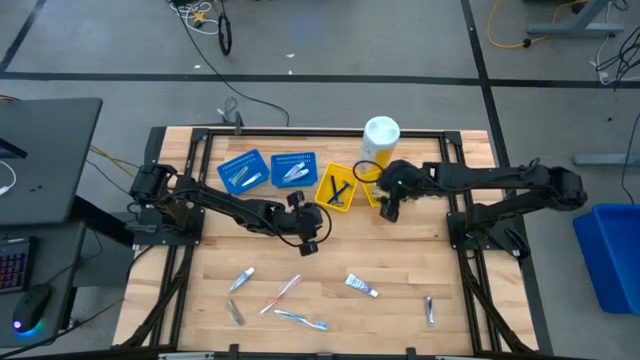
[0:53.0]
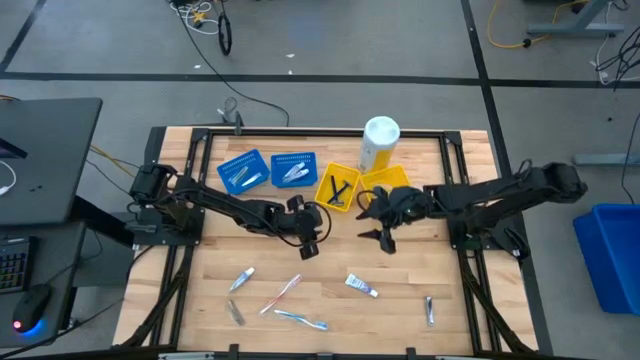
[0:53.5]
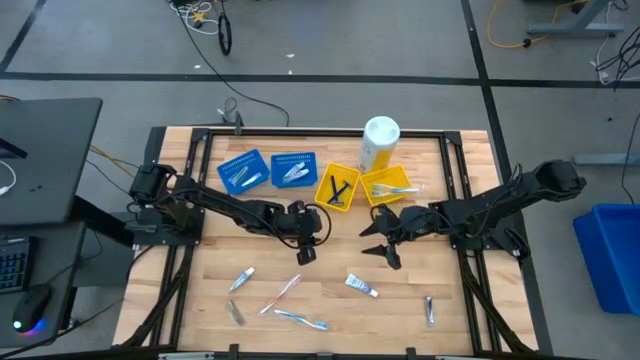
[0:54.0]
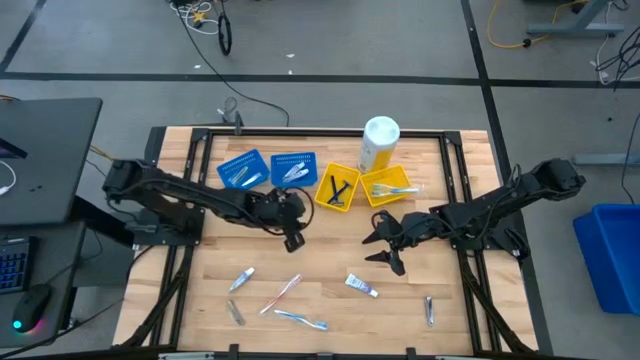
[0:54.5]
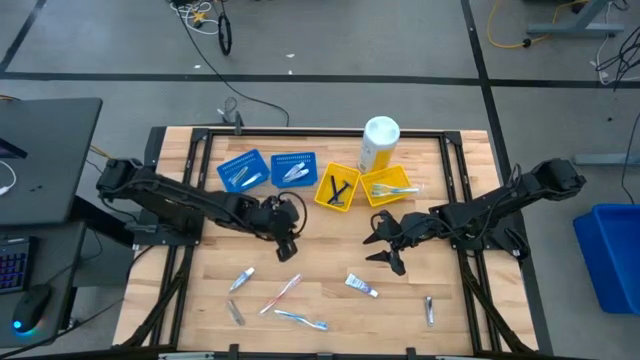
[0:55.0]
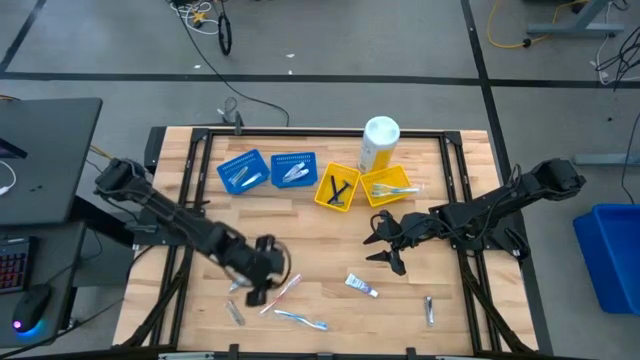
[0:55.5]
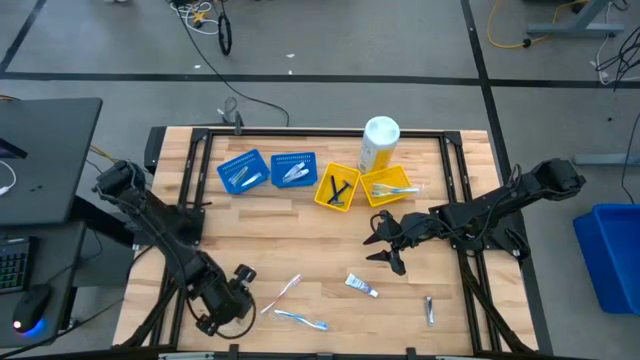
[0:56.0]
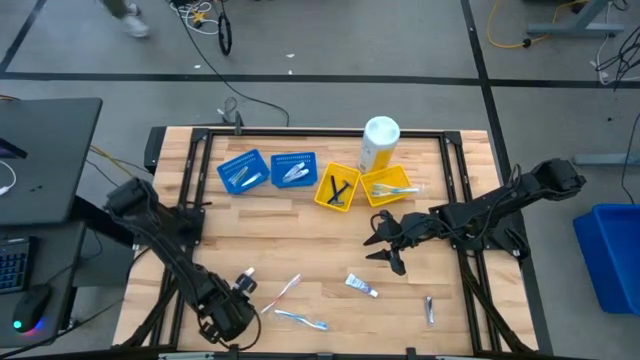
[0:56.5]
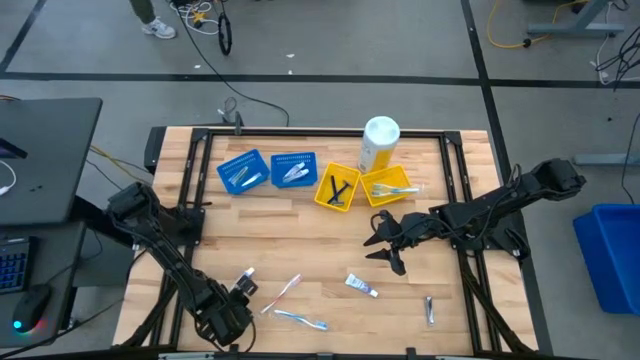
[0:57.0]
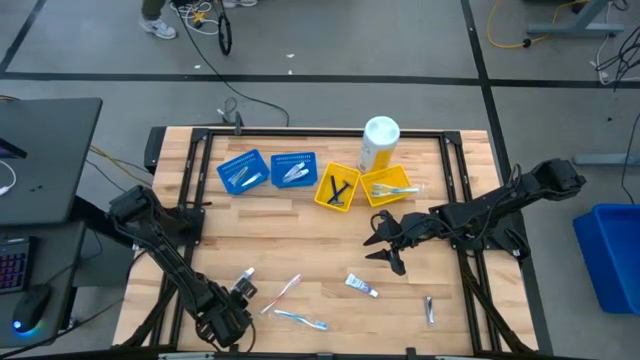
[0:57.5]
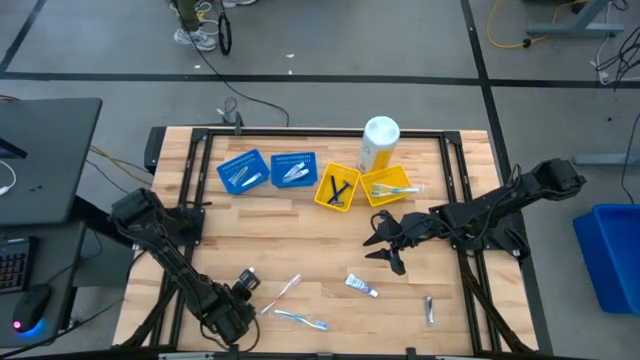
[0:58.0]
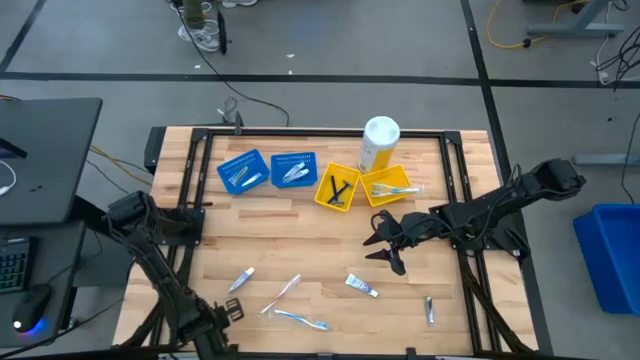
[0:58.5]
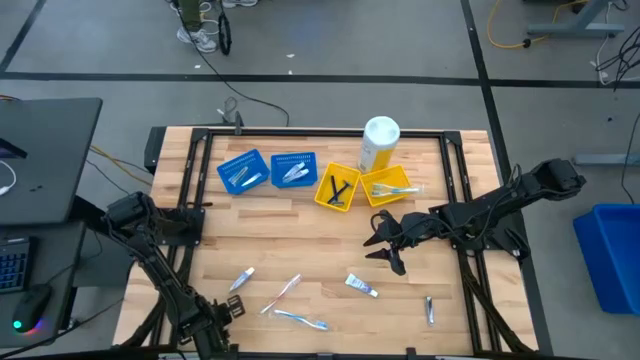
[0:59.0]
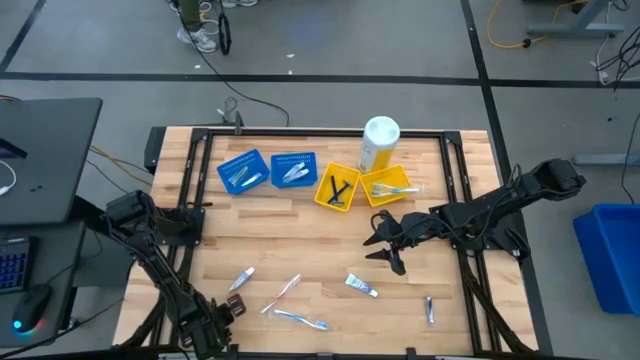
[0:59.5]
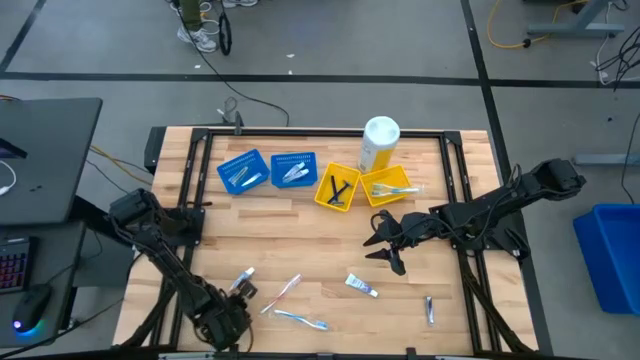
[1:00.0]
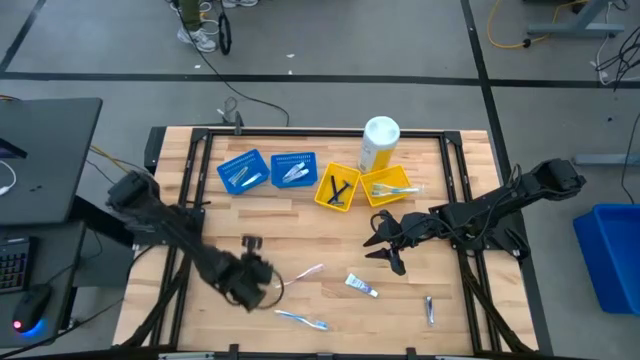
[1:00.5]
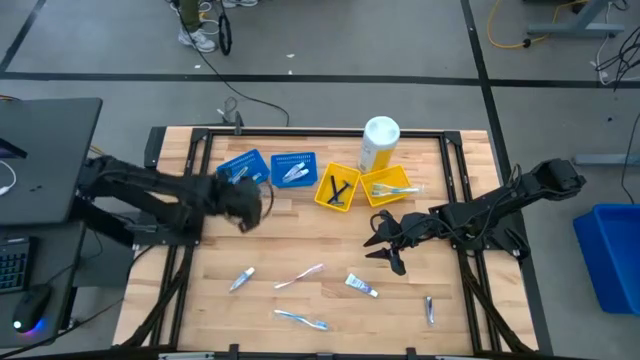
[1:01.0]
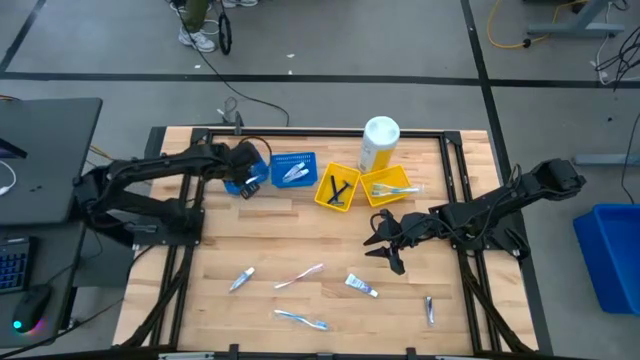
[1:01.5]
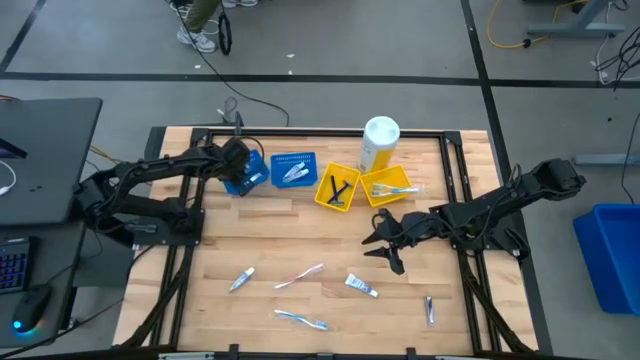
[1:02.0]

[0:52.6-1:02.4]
Task: Pick & Place Travel size toiletries
Put the silver nail cutter into the left blue bin

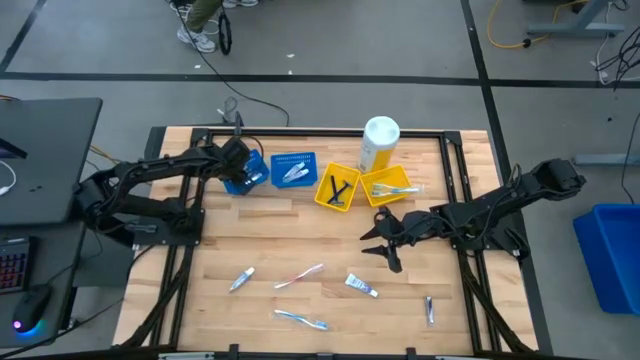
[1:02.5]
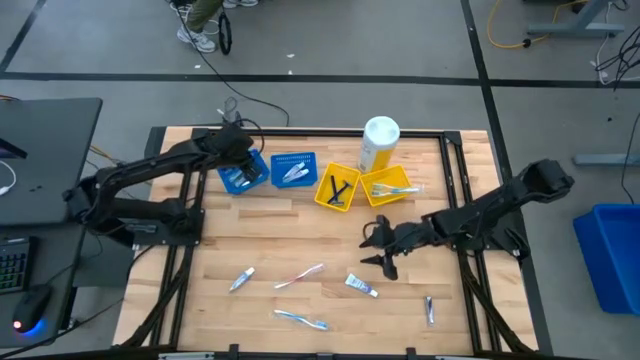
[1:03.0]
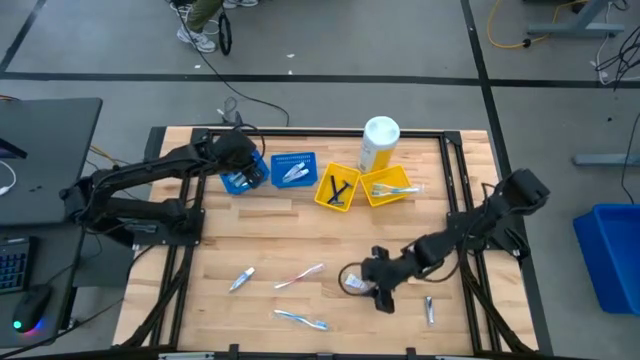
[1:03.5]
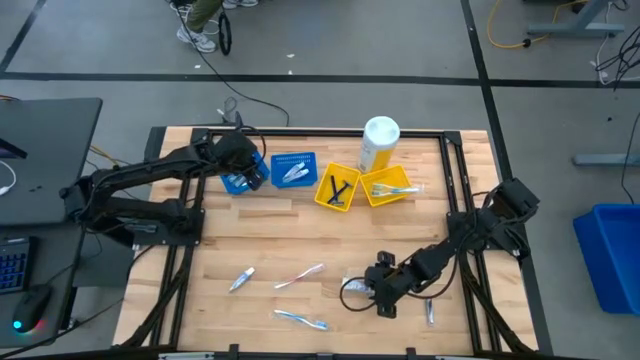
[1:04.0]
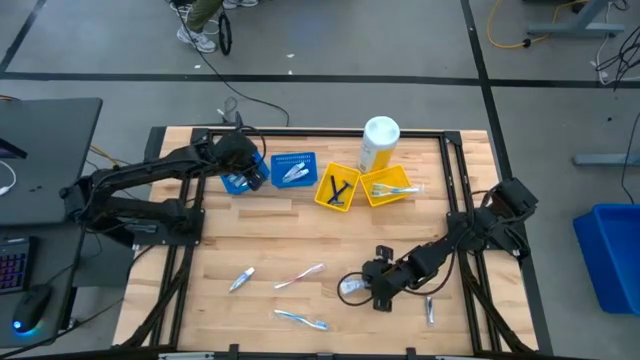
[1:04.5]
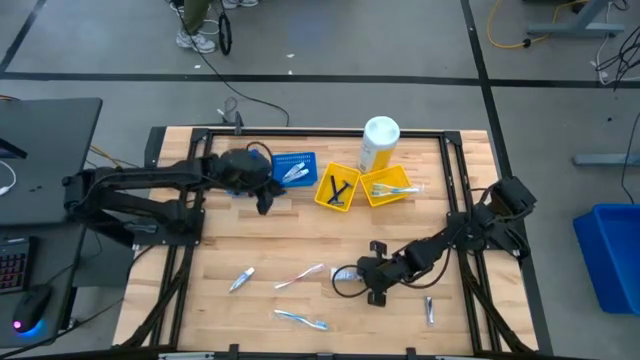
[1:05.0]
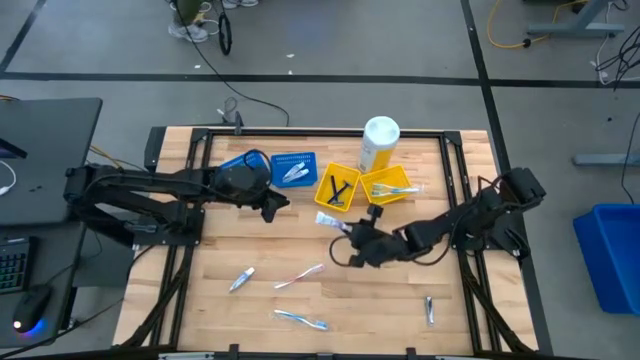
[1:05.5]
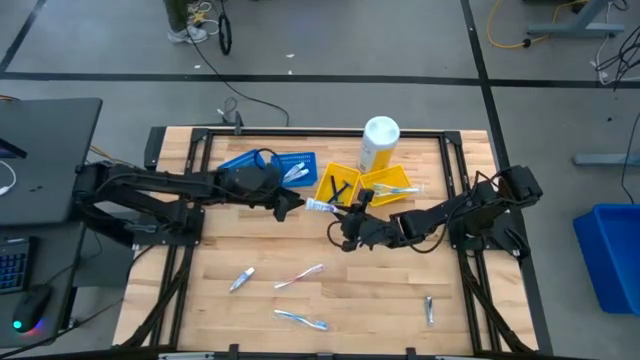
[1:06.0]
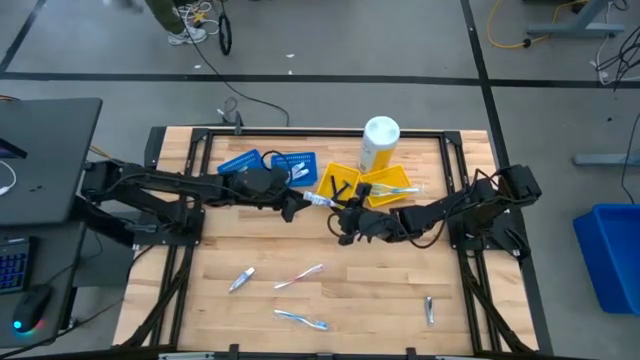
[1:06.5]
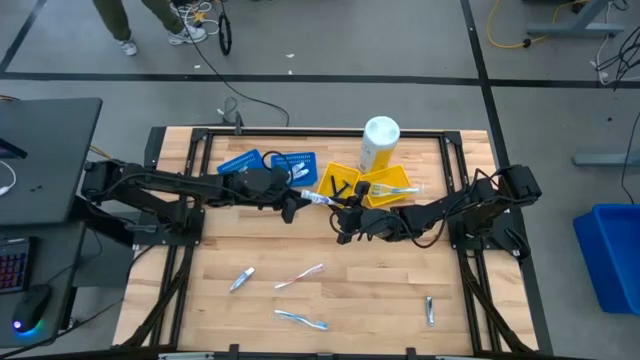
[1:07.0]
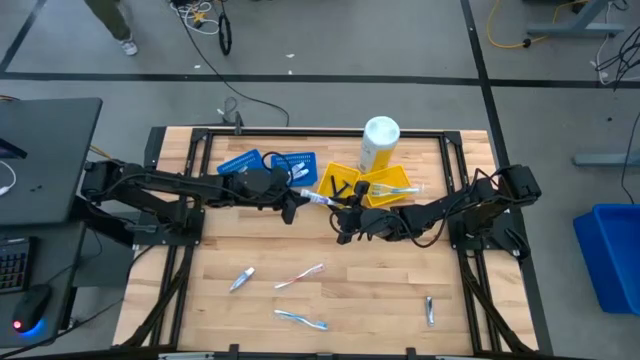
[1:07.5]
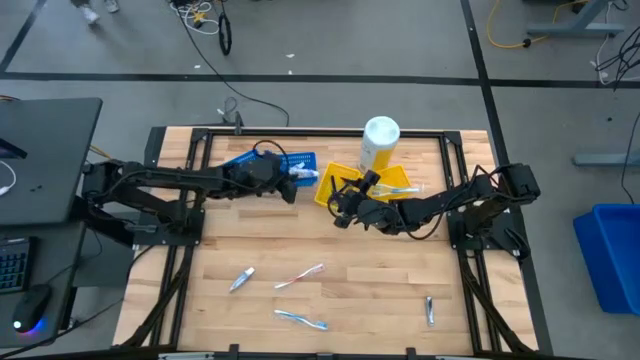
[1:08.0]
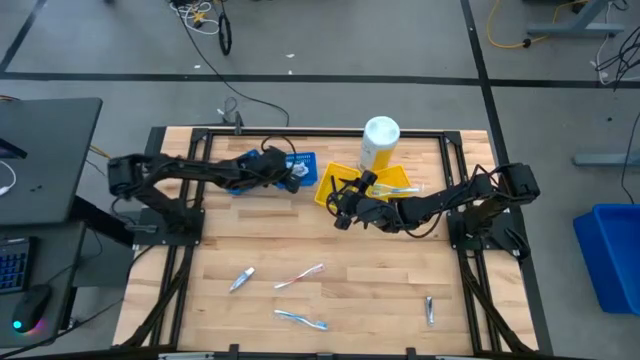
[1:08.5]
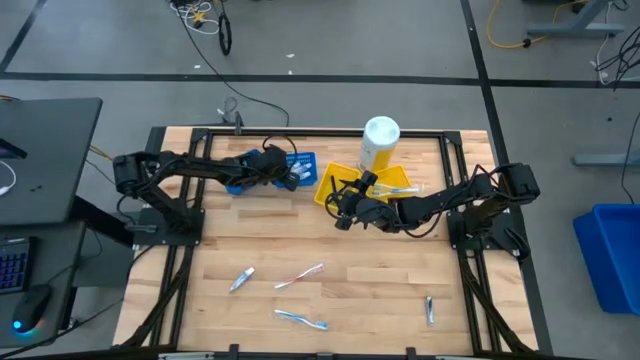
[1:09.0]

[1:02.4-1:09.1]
Put the white toothpaste into the right blue bin

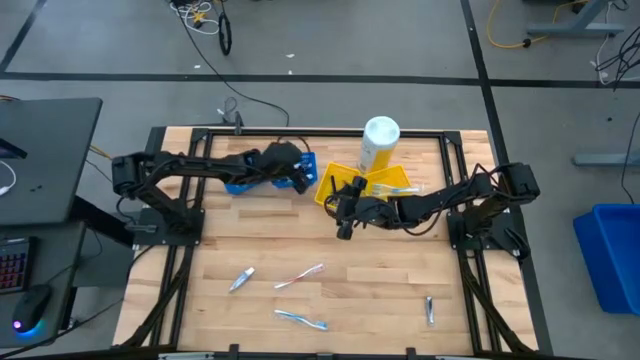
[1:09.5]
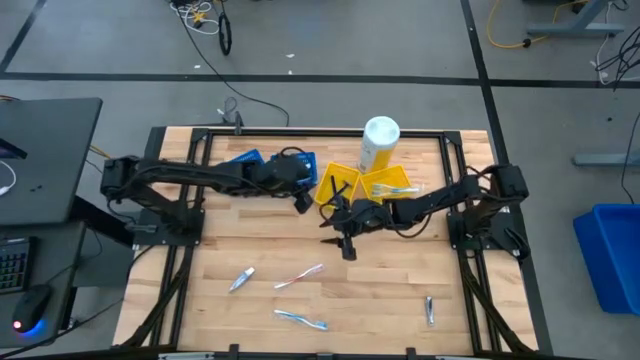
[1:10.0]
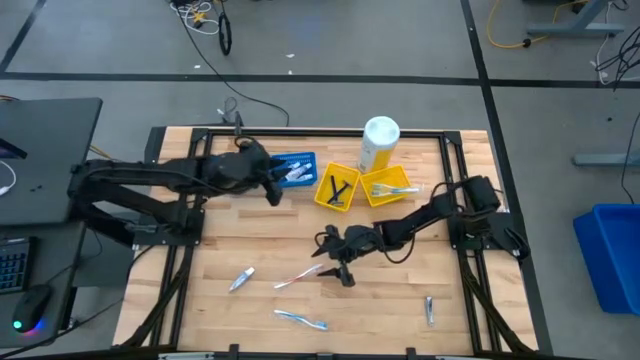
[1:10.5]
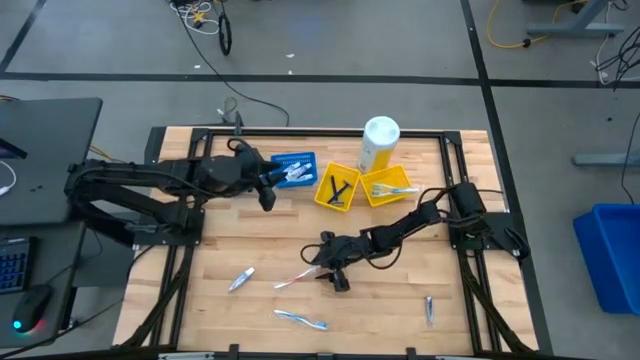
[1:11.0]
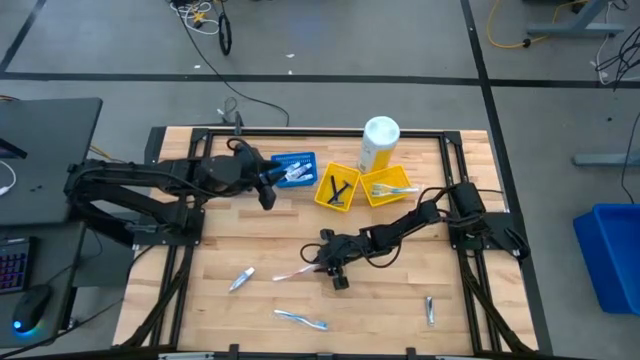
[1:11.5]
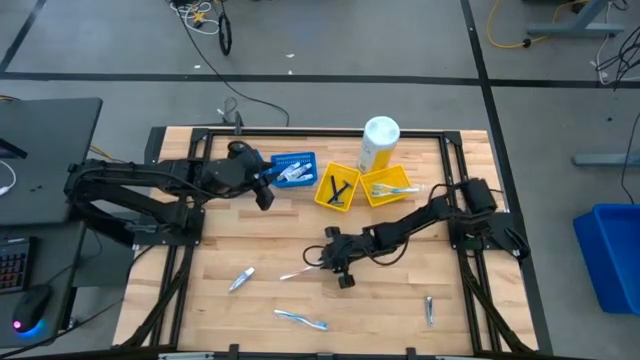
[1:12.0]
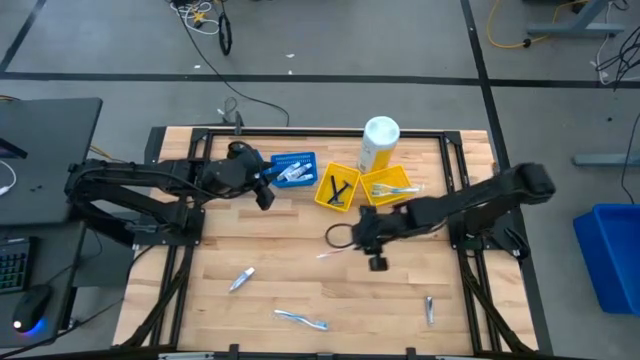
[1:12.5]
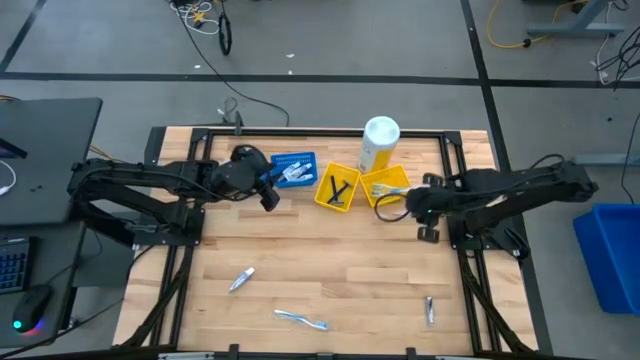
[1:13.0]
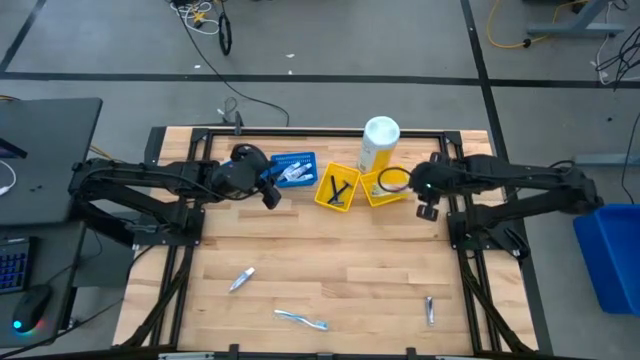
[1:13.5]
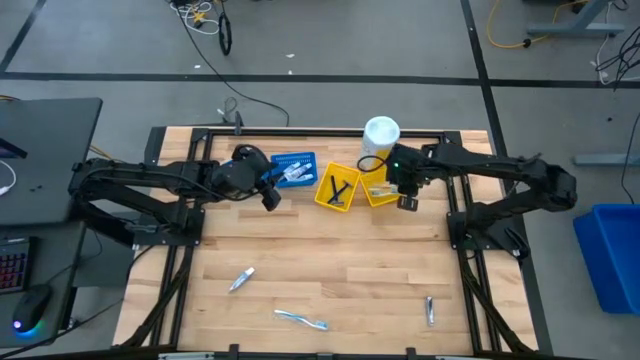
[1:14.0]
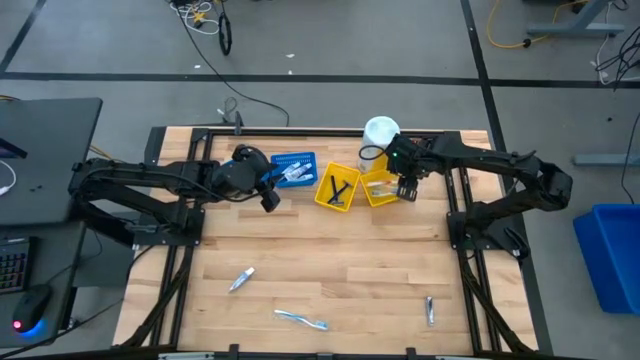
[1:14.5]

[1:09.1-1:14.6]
Put the red toothbrush into the right yellow bin
